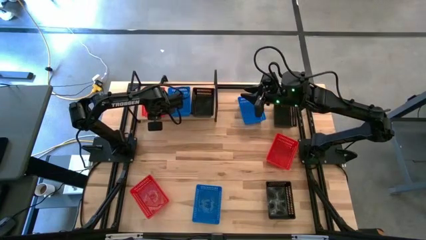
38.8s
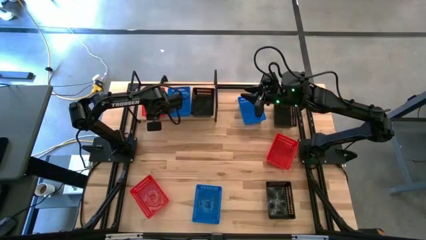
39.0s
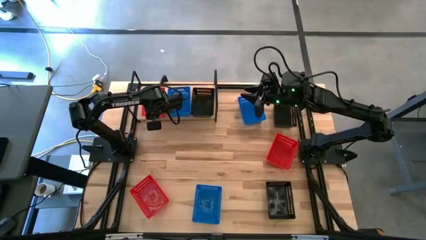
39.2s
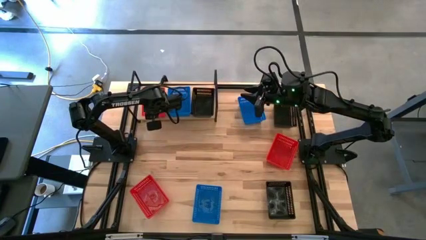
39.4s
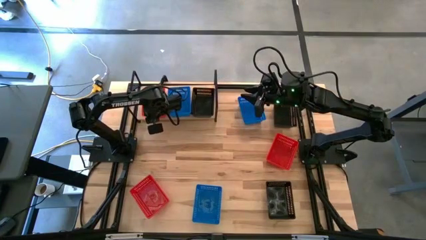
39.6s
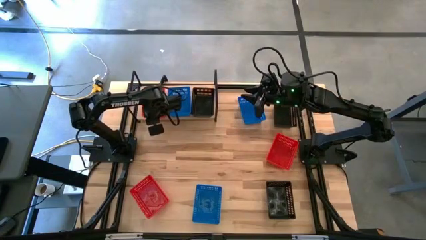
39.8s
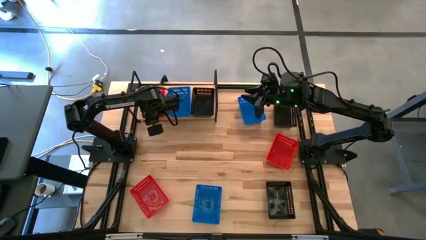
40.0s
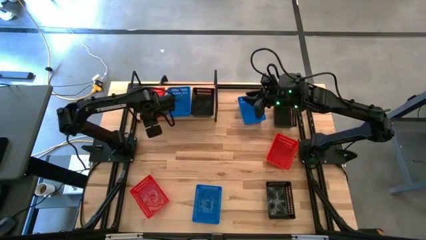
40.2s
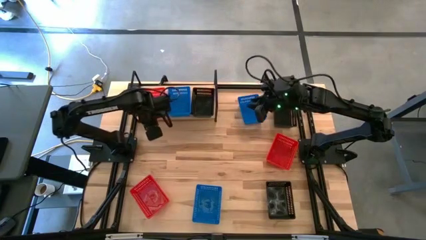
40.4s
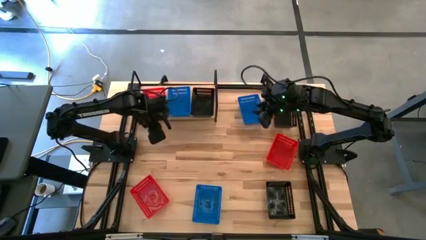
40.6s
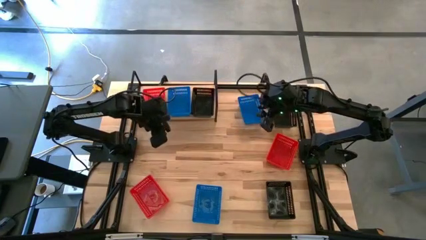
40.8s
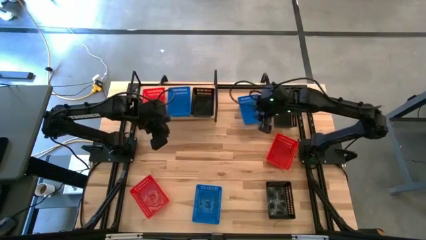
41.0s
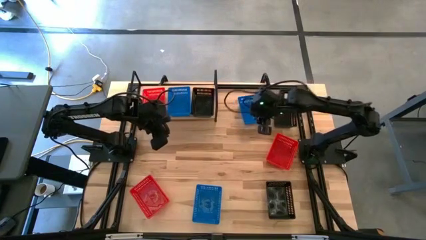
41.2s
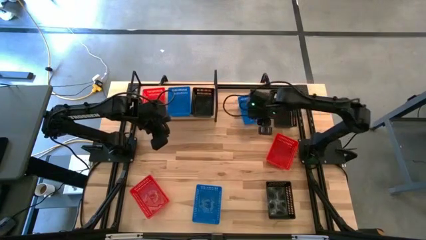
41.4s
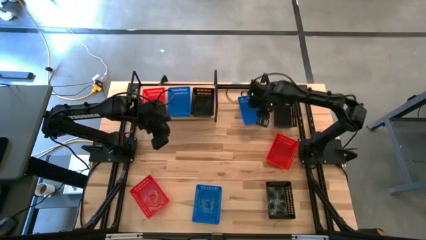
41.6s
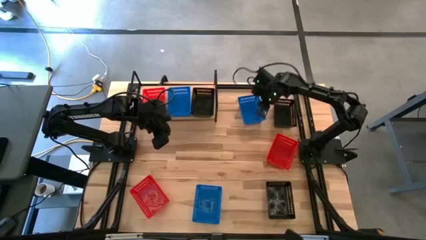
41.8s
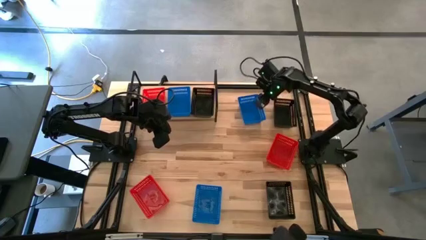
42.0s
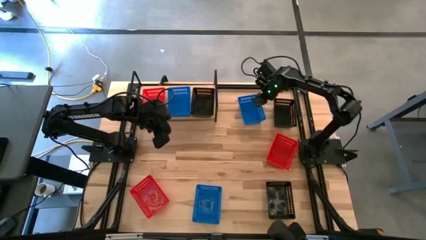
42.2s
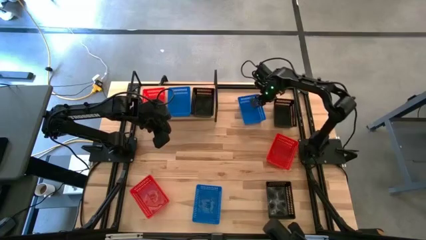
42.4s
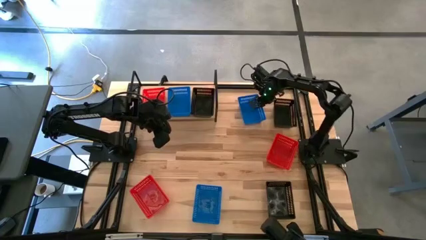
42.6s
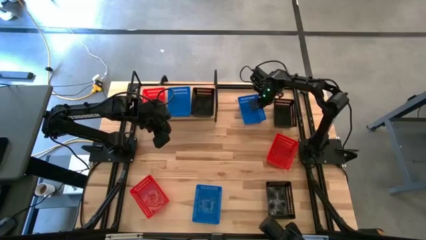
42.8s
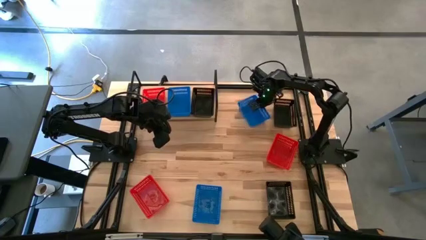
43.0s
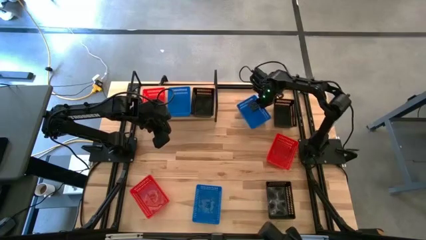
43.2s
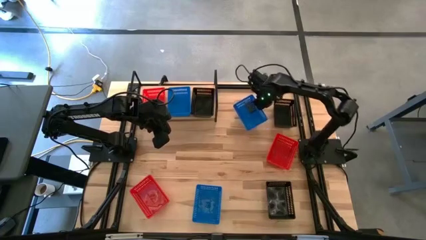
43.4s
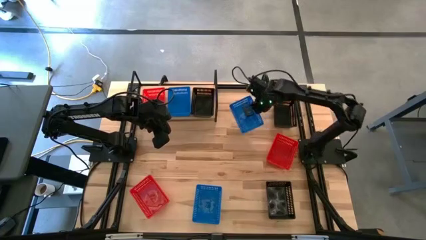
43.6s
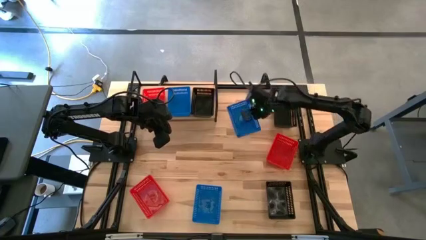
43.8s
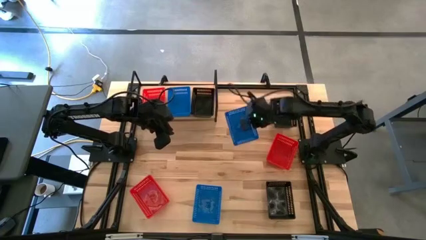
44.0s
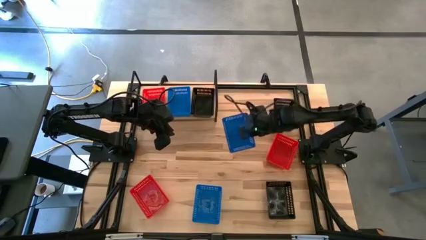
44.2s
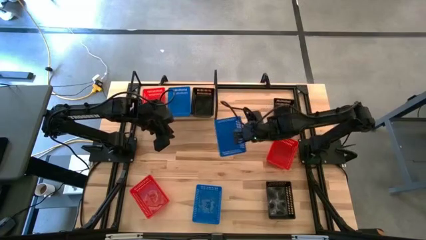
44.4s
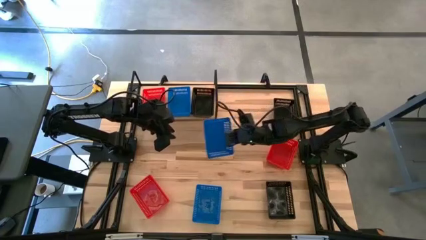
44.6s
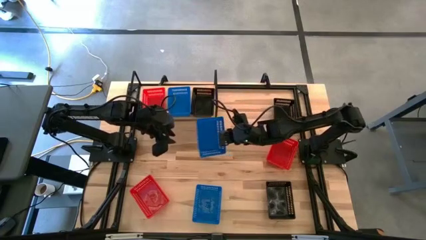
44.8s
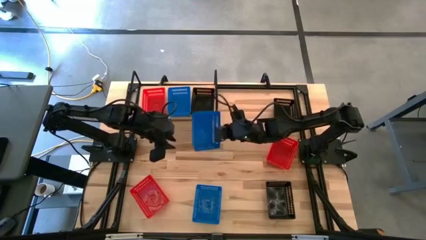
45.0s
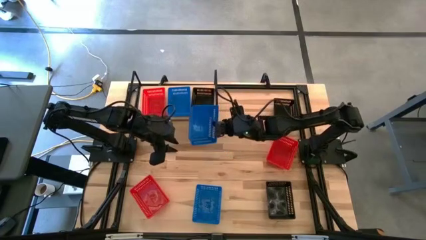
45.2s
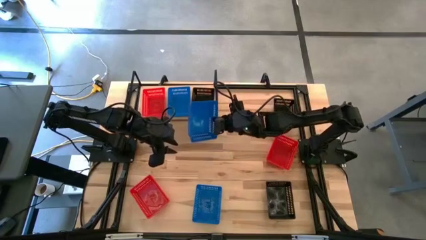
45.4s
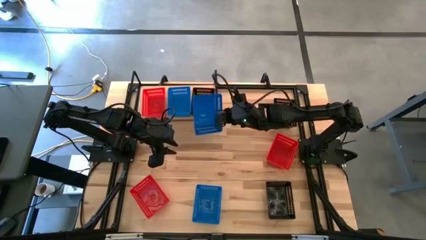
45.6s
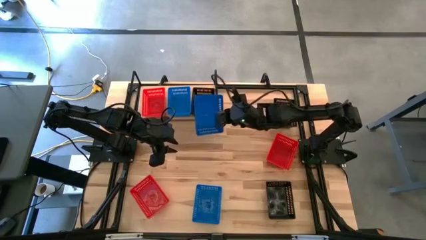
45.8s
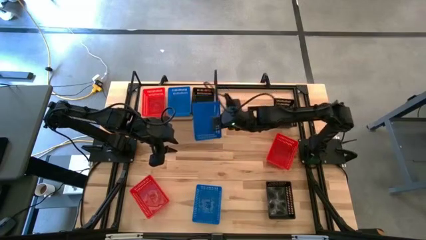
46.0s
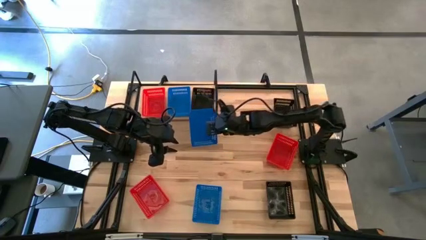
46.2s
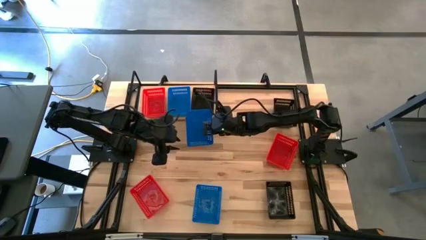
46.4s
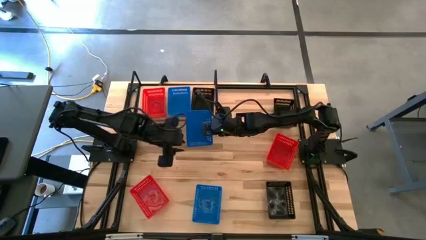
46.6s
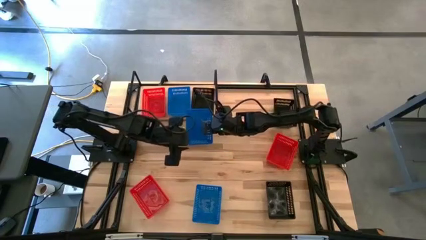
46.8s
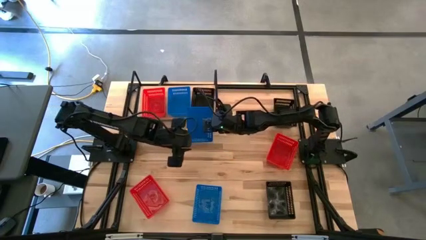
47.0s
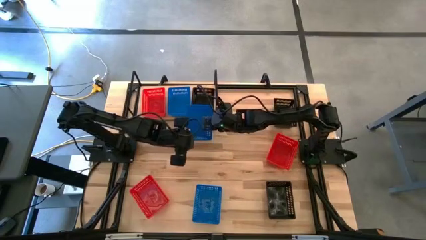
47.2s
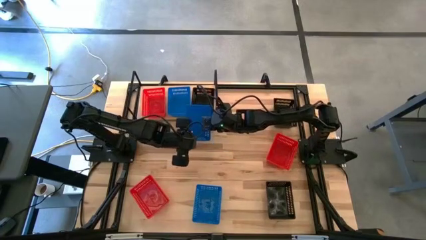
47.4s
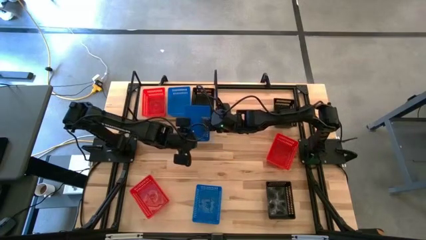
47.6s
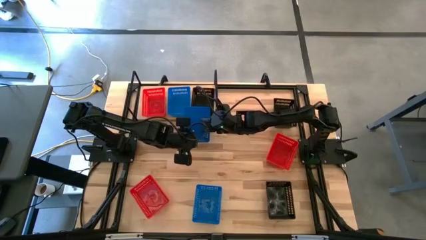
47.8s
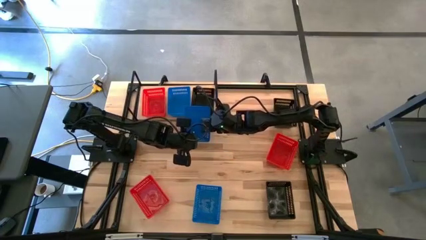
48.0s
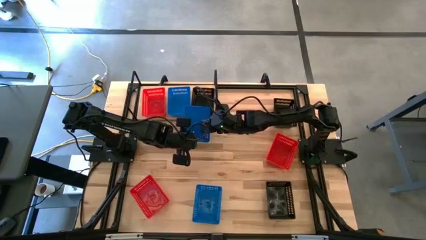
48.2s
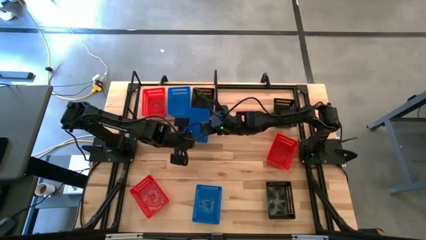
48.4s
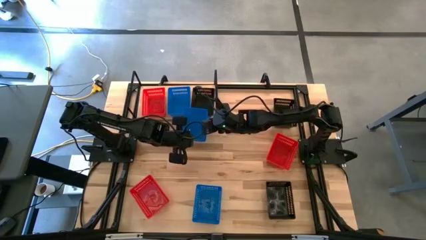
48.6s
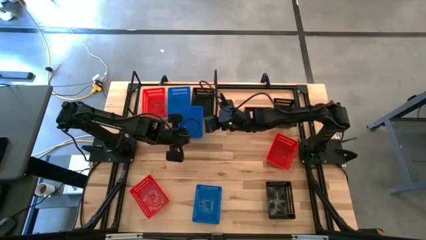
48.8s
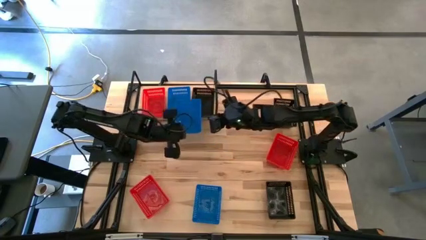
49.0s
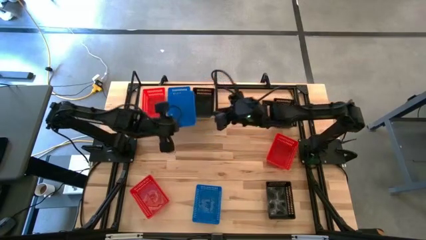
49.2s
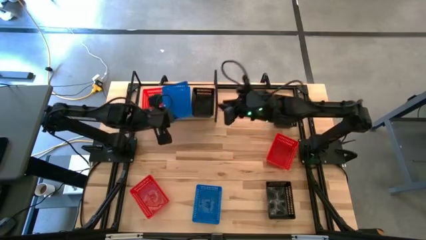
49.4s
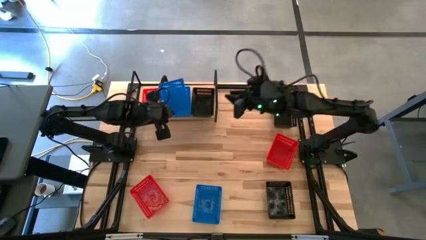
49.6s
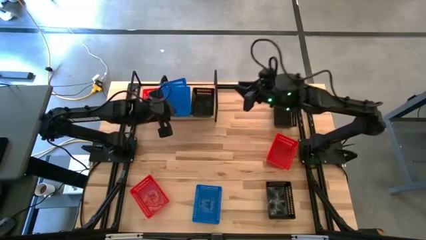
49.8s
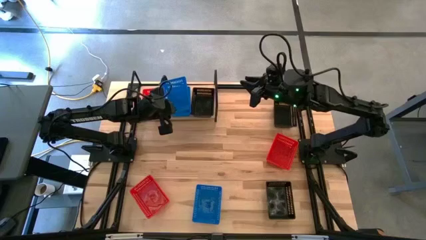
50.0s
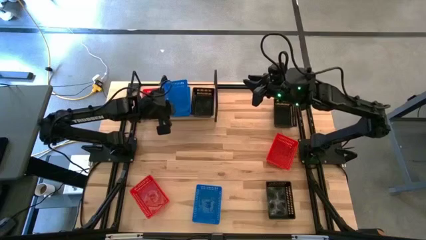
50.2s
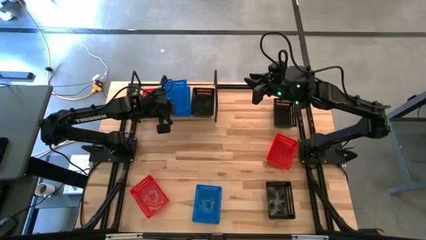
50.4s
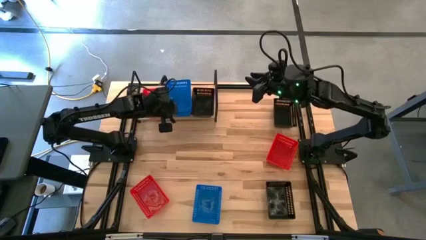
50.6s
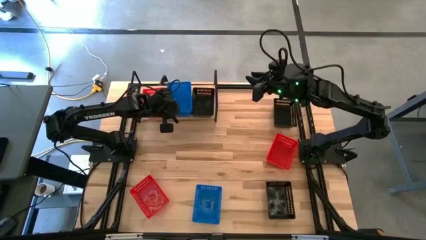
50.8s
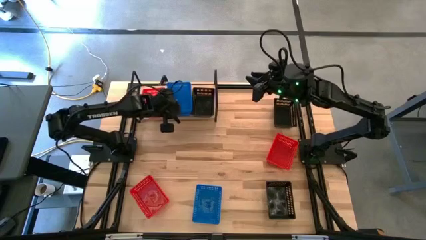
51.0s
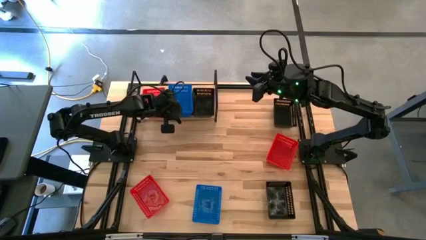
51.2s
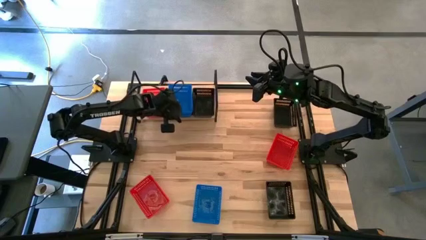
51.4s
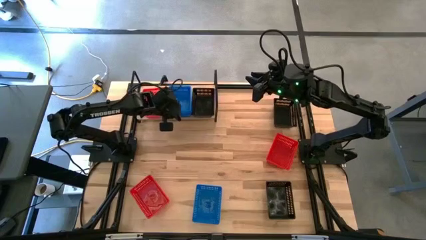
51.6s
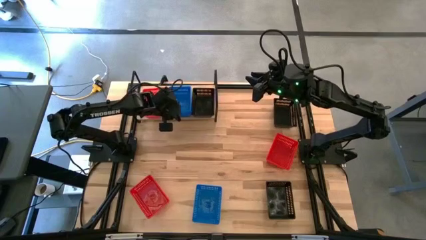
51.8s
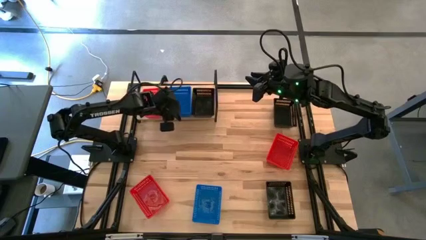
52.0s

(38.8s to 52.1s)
Task: Stack baskets on shelf by color
Stack the top blue bin on the other blue bin
